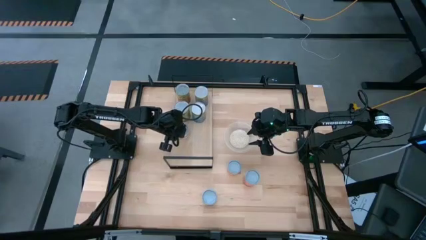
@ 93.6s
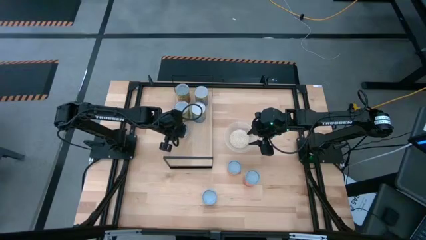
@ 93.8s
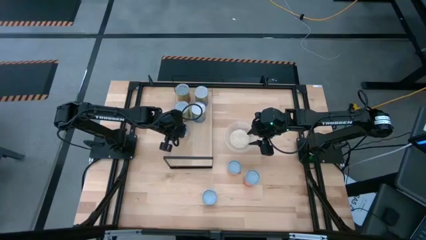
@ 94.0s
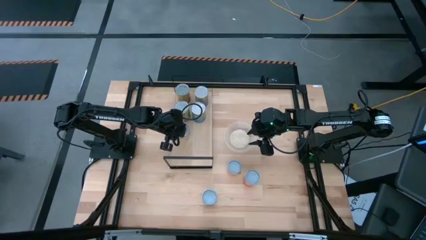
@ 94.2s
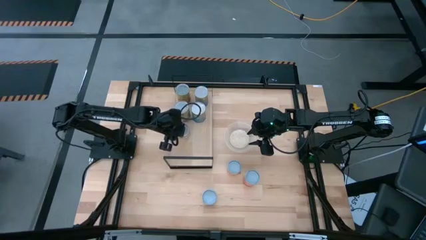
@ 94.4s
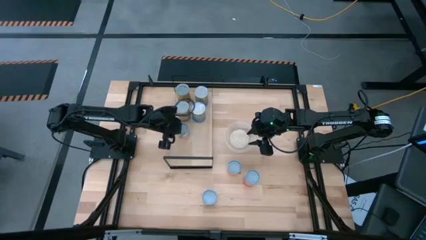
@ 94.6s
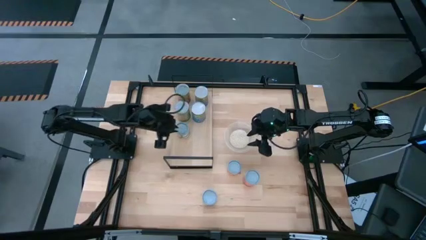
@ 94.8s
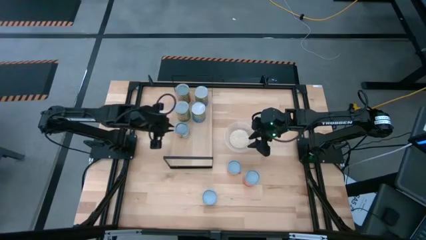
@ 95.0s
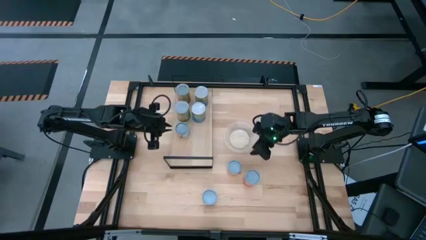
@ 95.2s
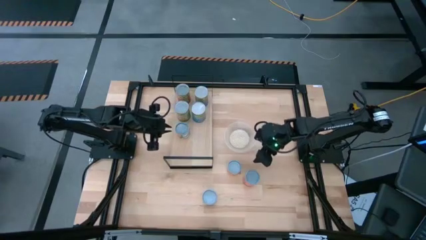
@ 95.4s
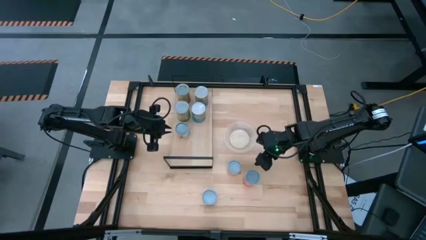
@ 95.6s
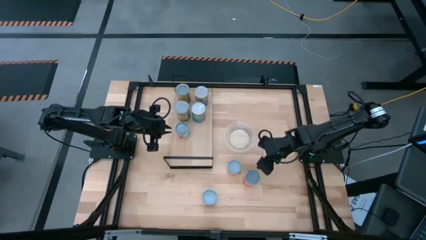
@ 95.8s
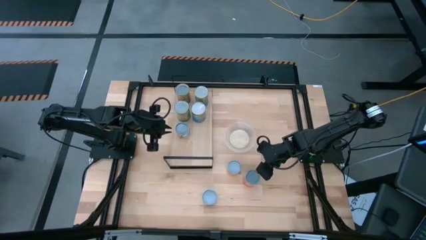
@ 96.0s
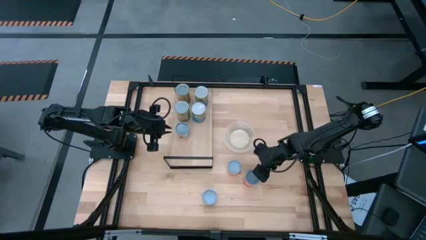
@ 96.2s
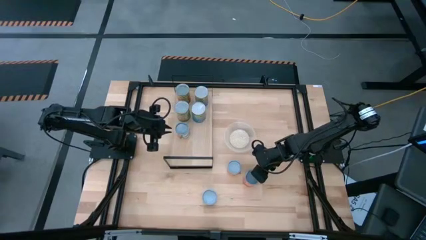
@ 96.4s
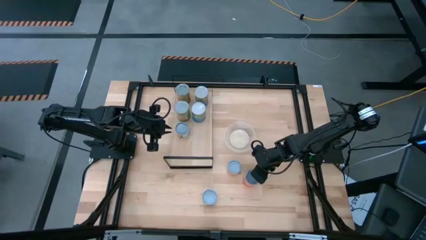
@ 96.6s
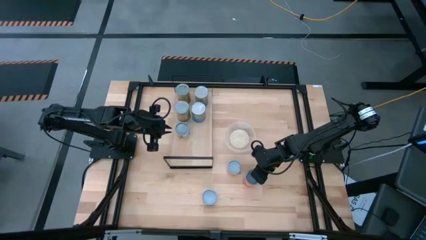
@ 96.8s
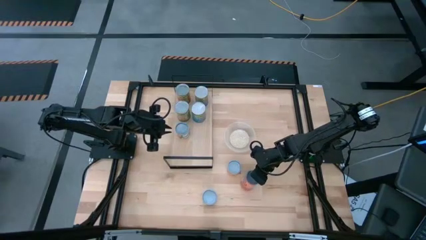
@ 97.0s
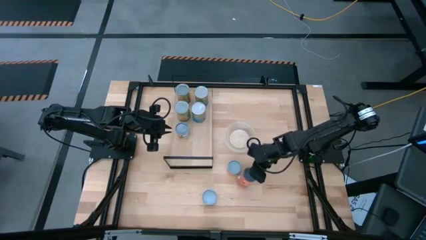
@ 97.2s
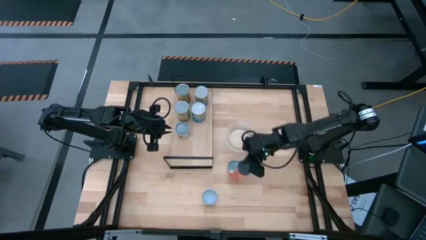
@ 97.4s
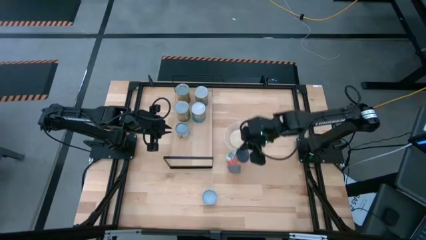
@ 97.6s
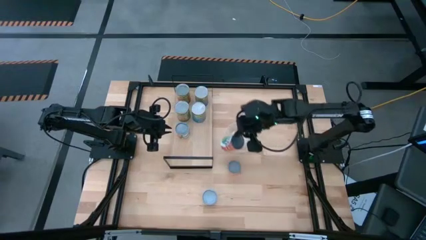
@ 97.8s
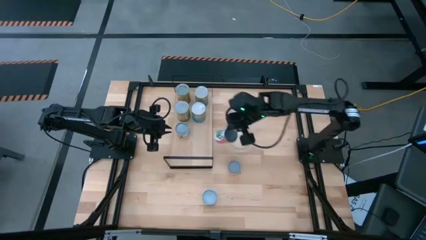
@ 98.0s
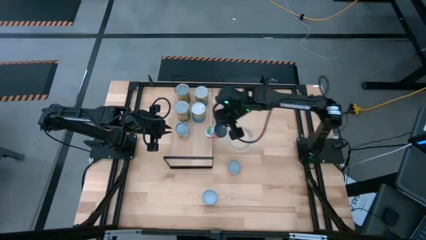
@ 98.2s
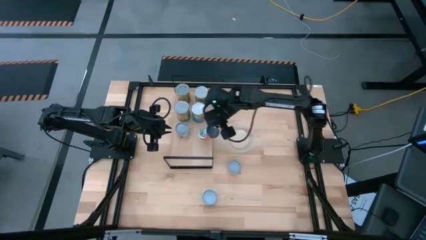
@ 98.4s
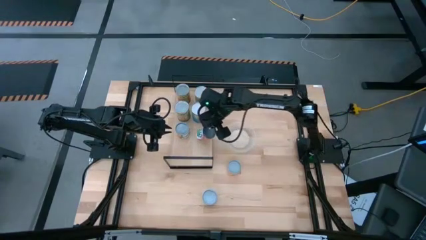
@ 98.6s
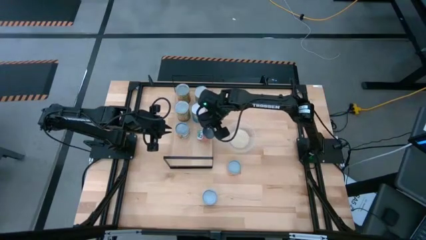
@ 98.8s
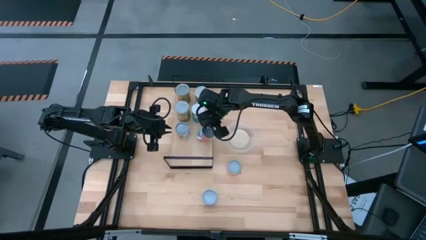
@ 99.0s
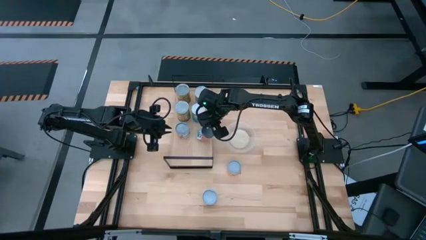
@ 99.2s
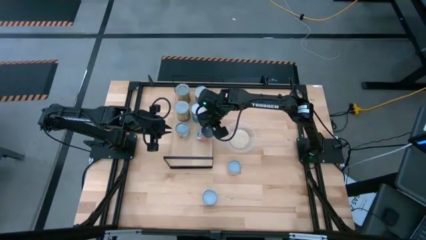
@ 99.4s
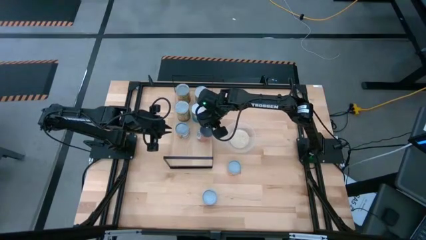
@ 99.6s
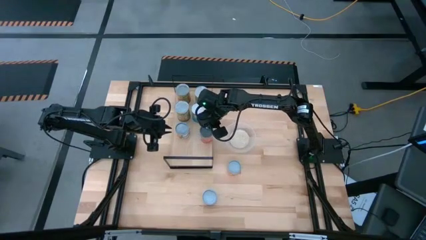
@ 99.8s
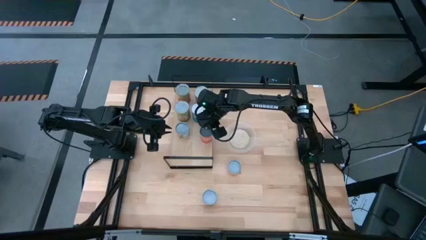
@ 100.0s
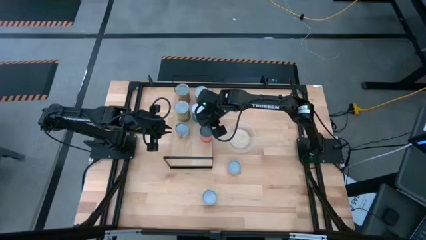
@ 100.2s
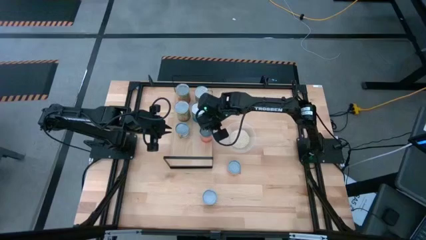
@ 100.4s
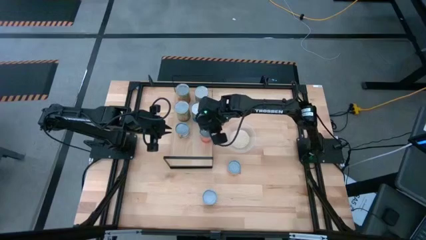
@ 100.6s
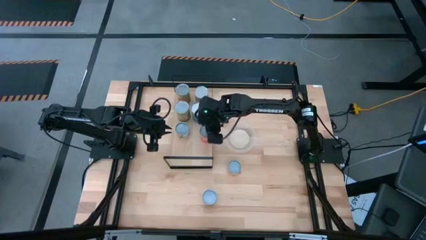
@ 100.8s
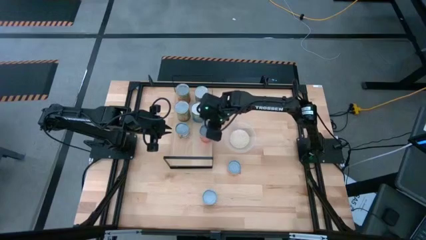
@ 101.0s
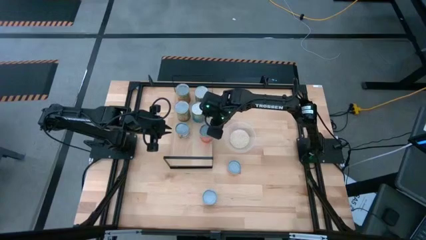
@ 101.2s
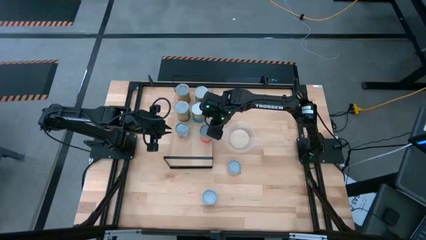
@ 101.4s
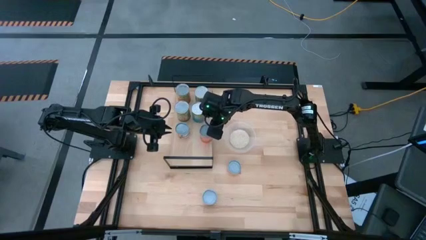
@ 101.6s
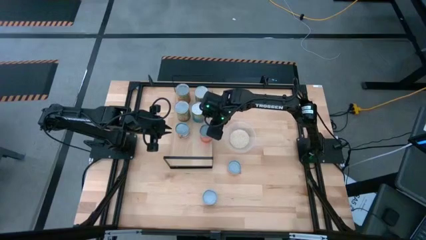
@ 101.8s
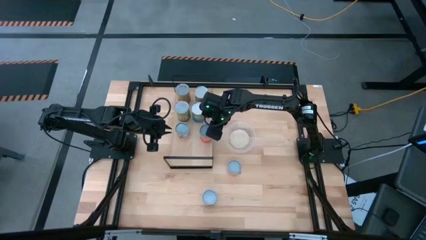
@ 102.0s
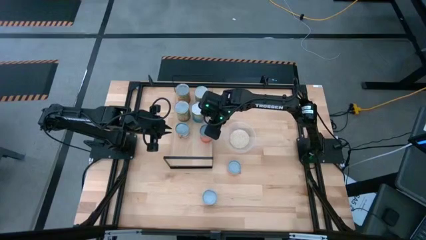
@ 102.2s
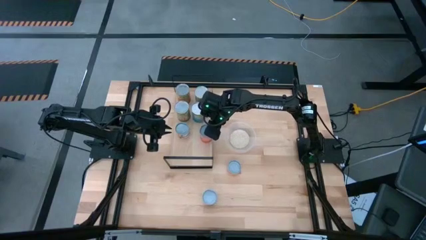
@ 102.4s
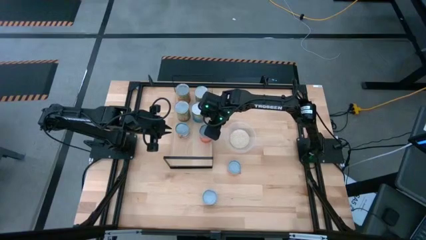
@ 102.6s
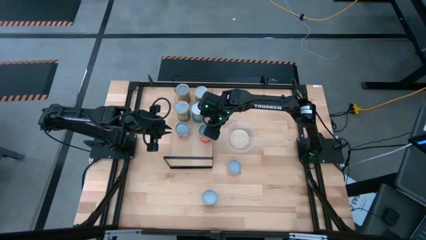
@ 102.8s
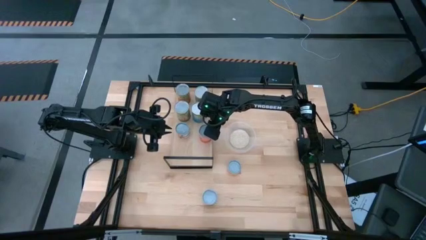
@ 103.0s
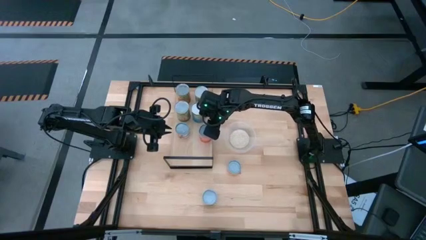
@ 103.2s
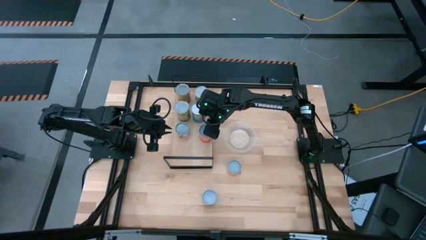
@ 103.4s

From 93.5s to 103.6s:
Task: Pick and place cans onto a shelf
Put the small canned mixed fruit can on the shelf
